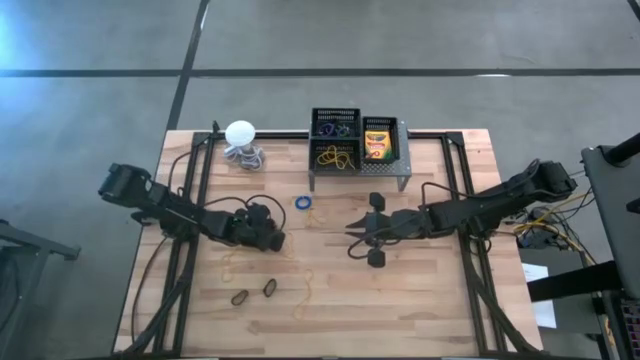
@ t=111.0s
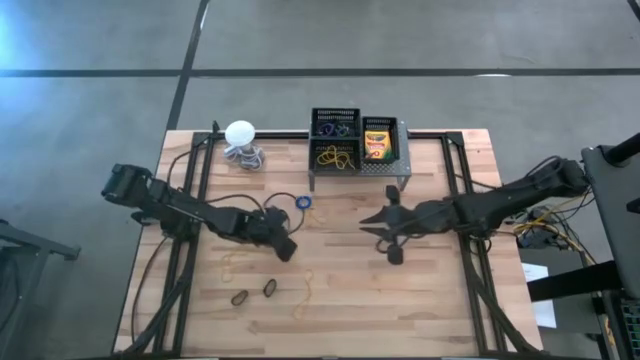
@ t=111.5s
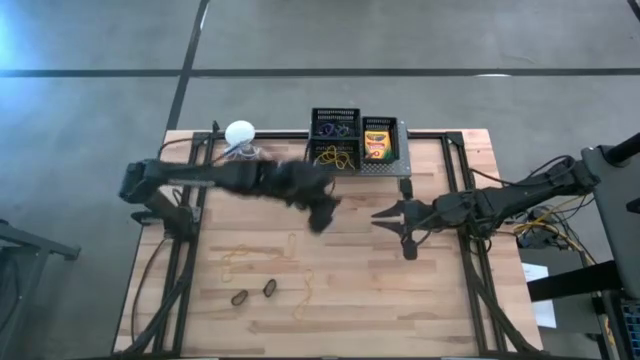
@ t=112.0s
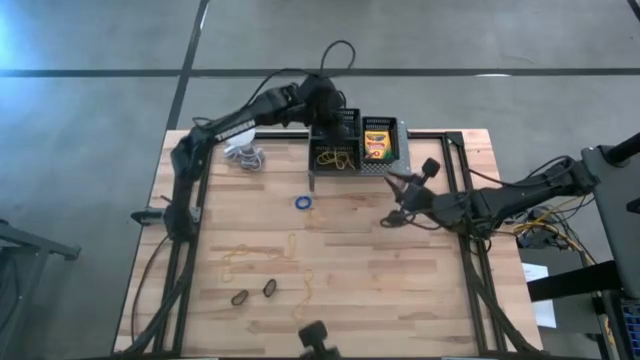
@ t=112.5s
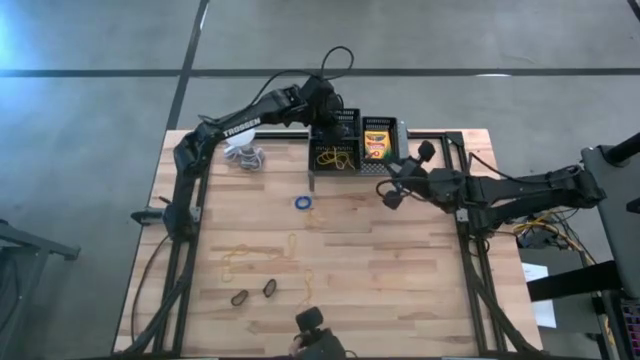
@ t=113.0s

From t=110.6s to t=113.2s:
Task: Pick & Place Office Desk Supplies
Put the black spring keychain into the top left black bin

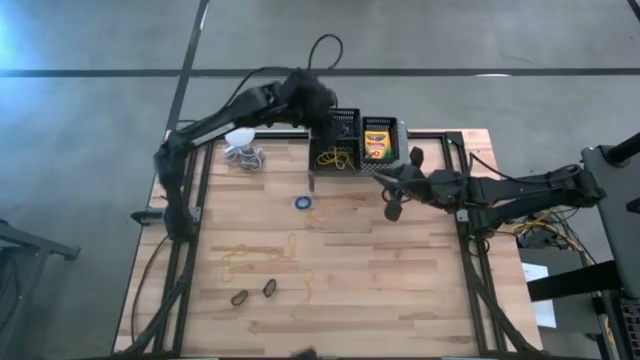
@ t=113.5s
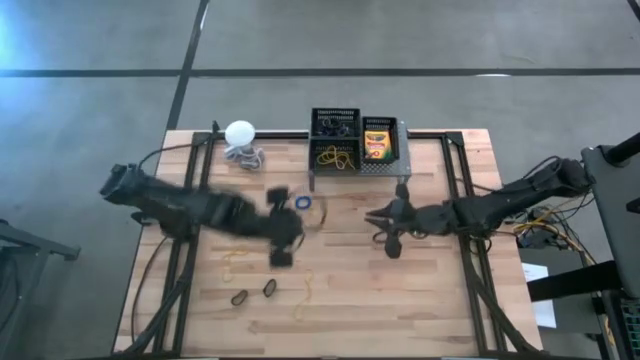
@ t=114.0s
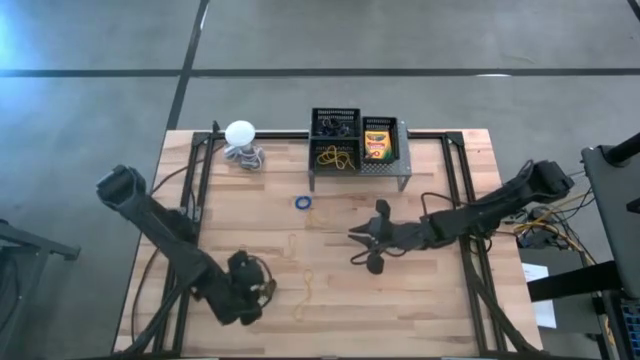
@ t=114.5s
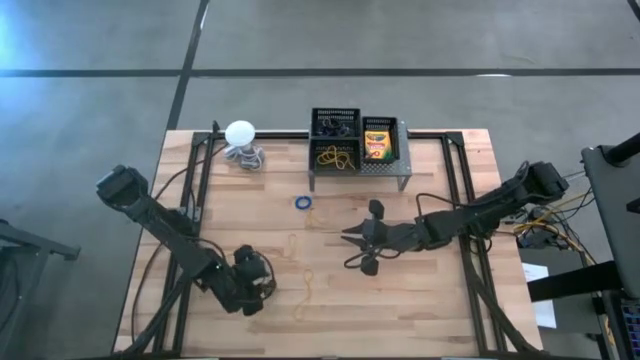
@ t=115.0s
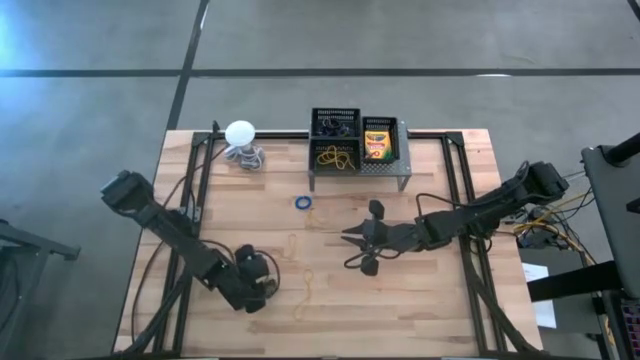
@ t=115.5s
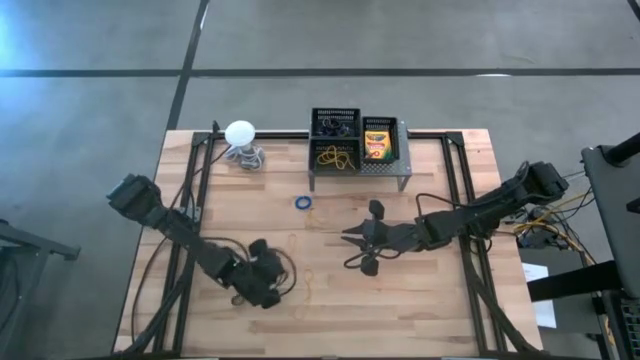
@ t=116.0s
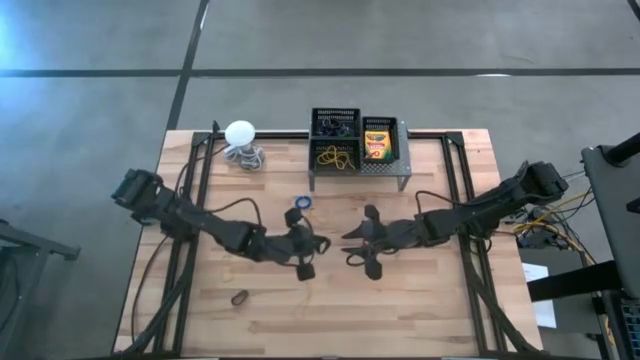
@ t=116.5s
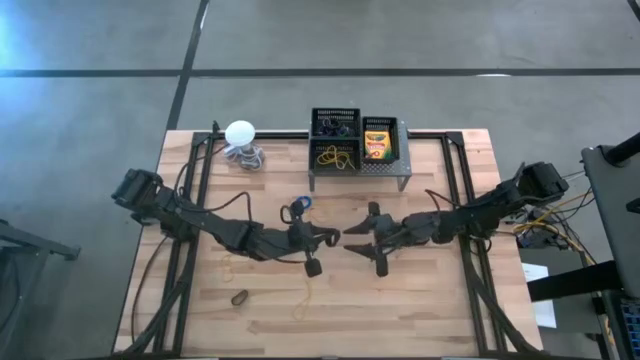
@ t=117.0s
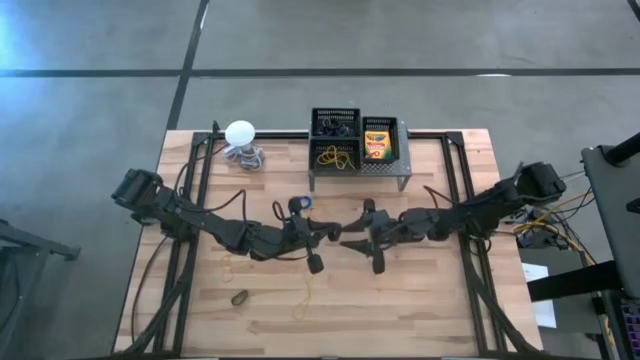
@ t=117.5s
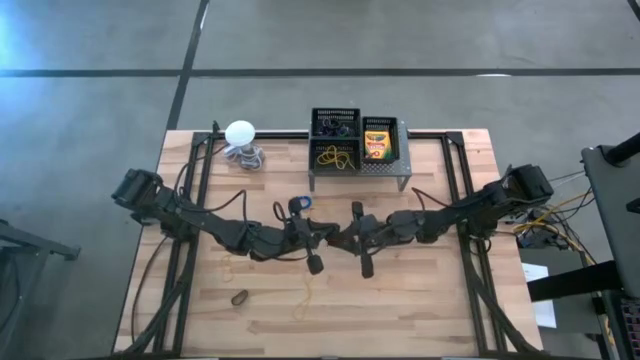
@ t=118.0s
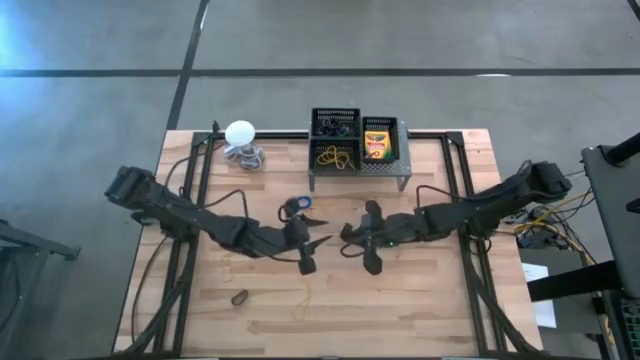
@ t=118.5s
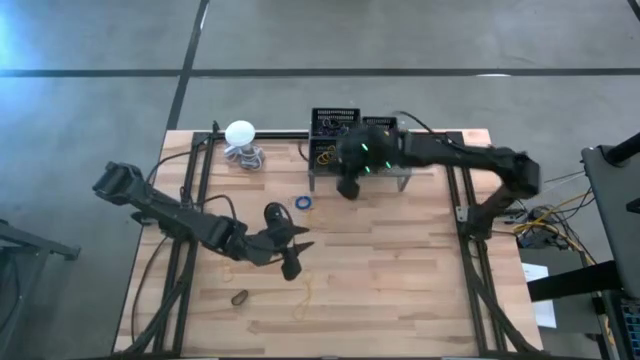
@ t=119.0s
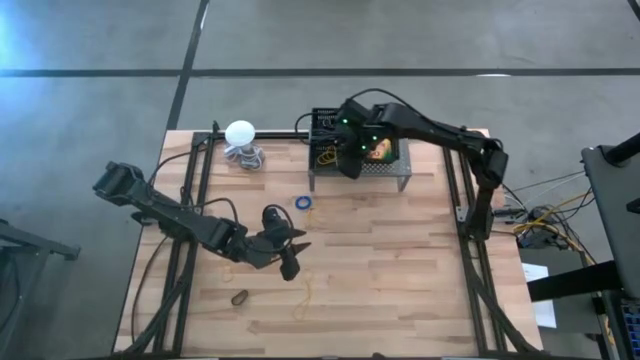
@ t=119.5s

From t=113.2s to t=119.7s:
Put the black rubber band into the bottom left black bin

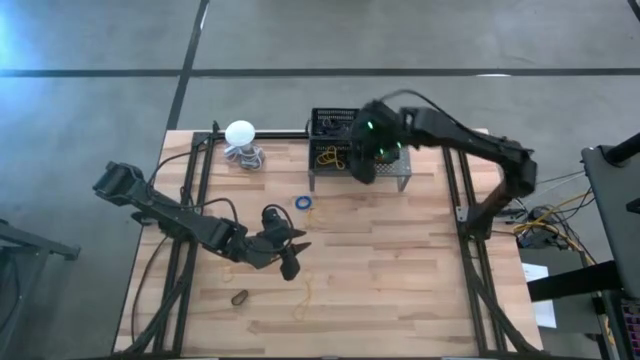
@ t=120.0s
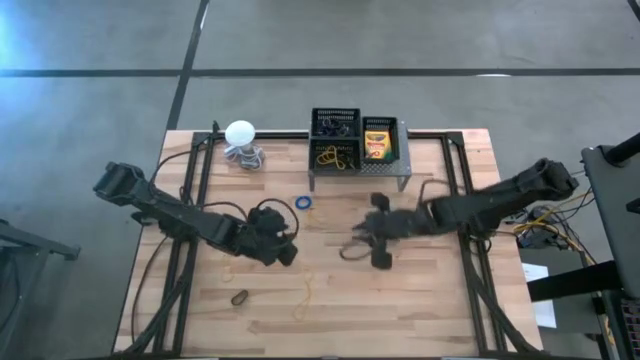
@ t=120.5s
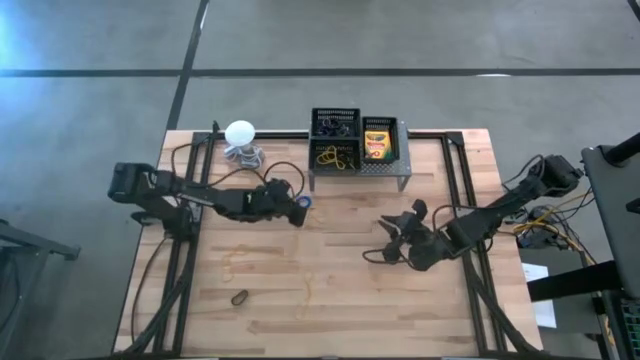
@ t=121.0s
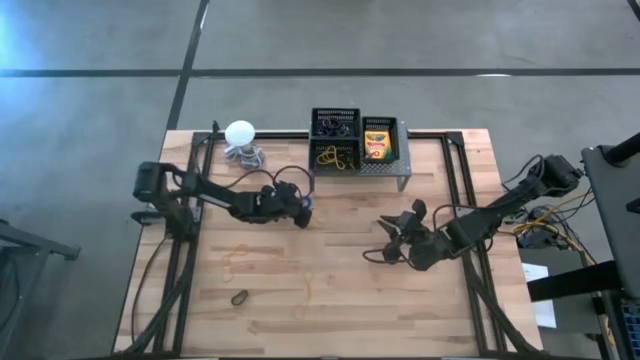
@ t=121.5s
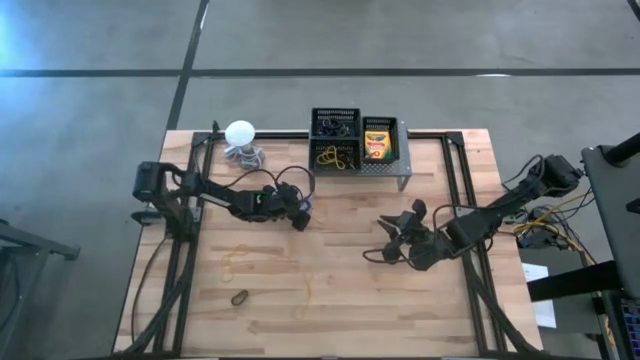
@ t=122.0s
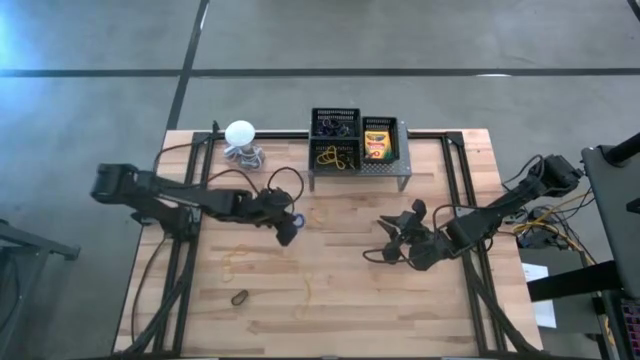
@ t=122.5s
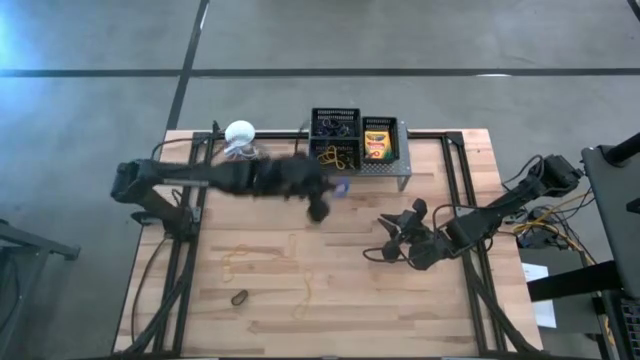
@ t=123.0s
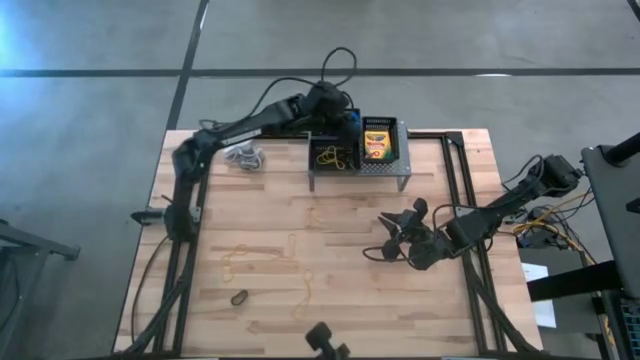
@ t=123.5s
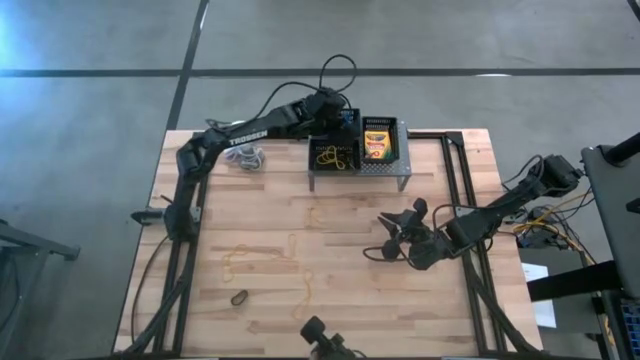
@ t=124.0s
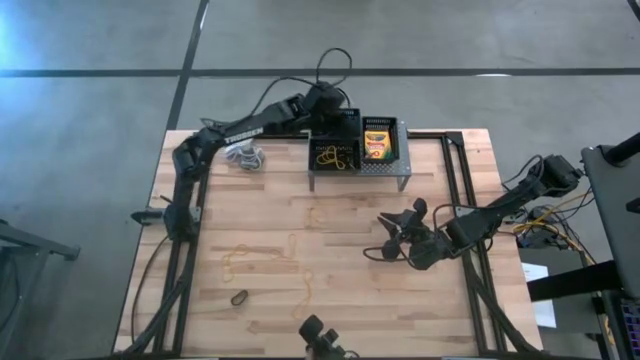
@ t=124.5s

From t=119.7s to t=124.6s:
Put the blue spring keychain into the top left black bin

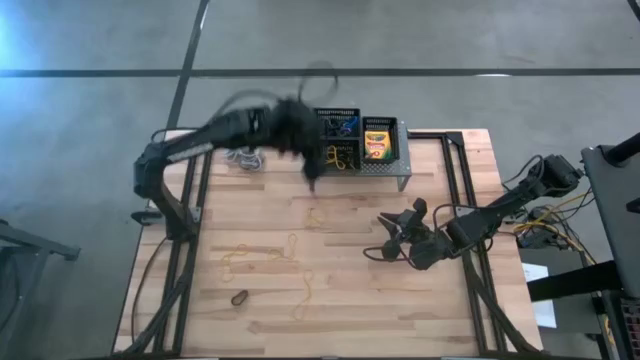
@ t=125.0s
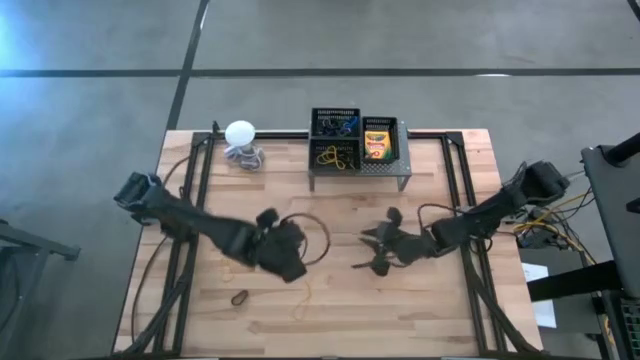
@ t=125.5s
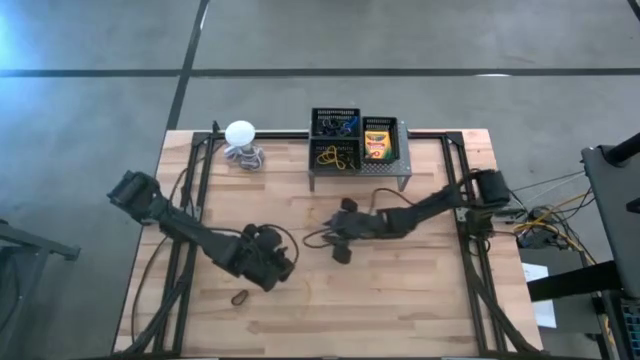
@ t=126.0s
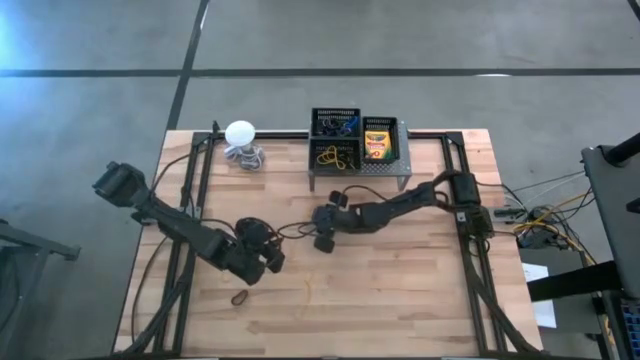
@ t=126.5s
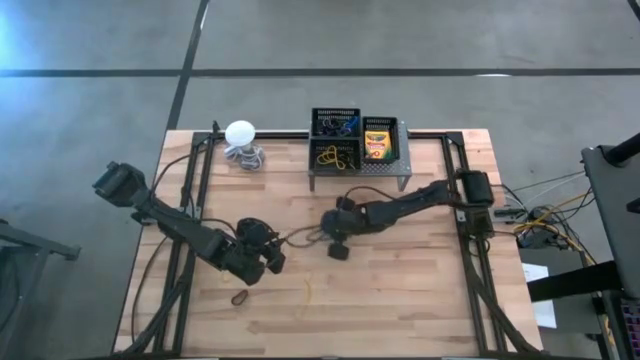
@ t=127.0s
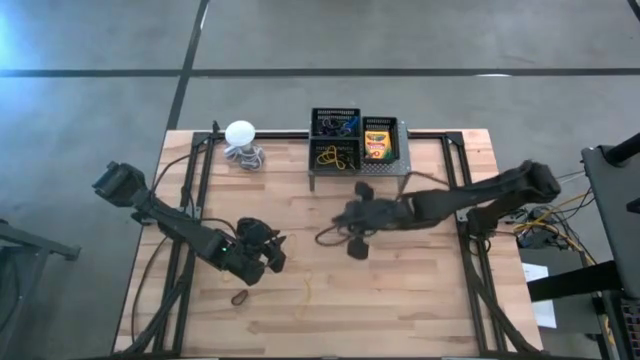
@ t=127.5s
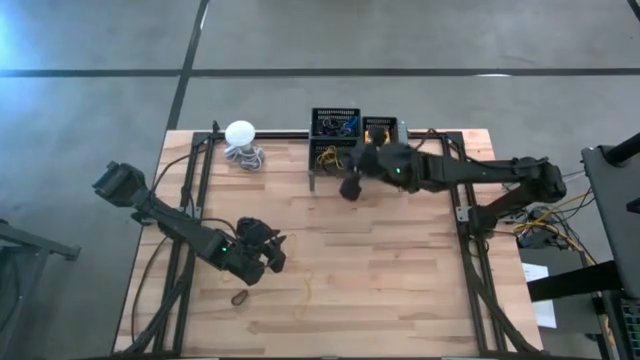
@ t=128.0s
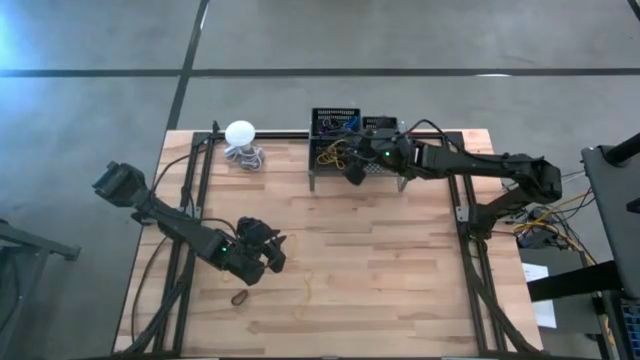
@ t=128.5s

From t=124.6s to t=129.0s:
Put the yellow rubber band into the bottom left black bin

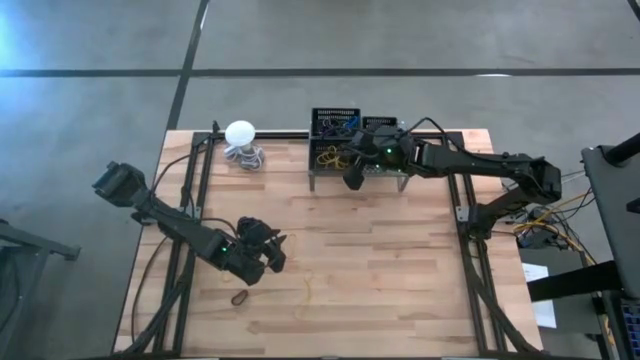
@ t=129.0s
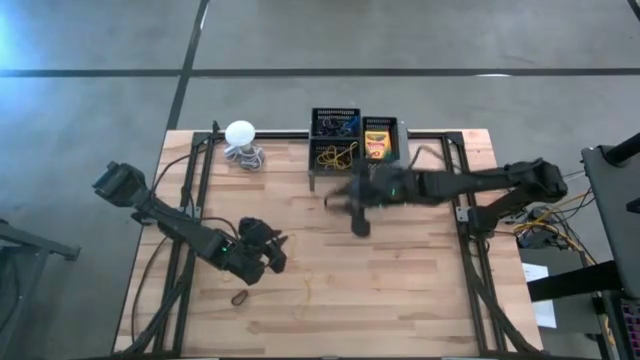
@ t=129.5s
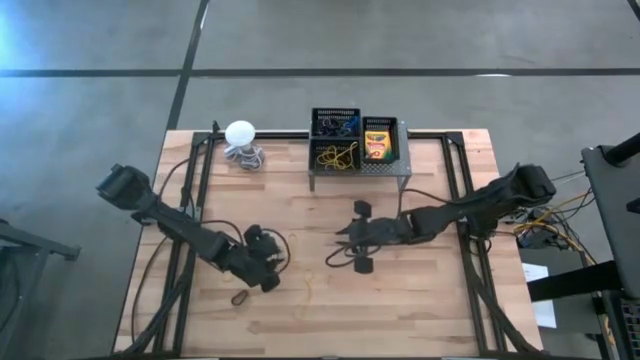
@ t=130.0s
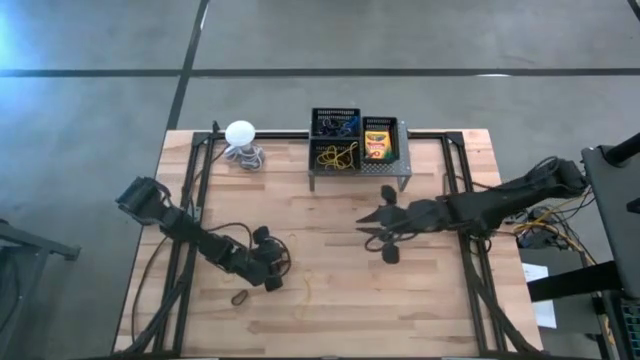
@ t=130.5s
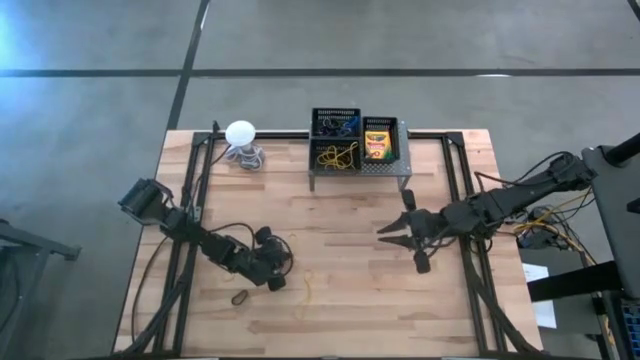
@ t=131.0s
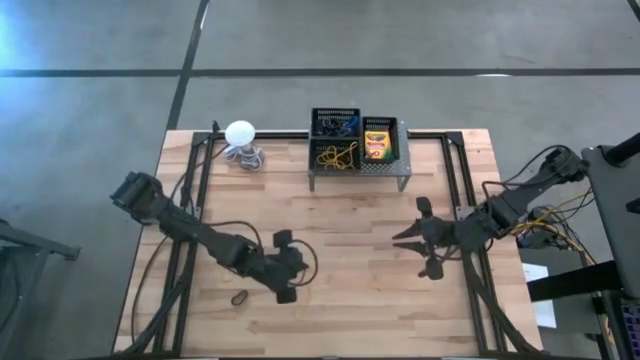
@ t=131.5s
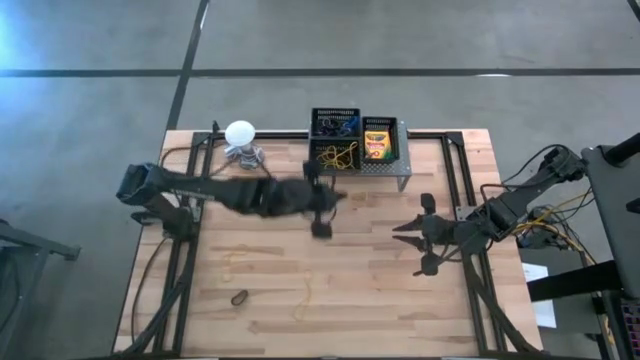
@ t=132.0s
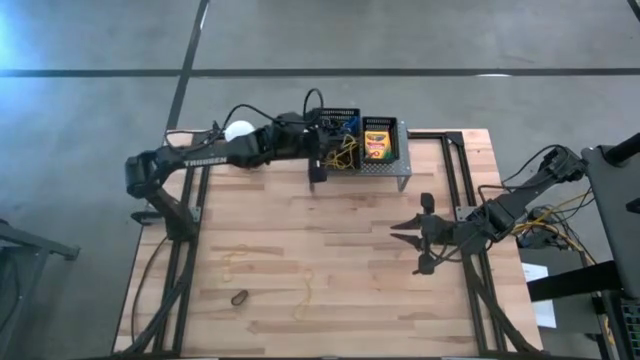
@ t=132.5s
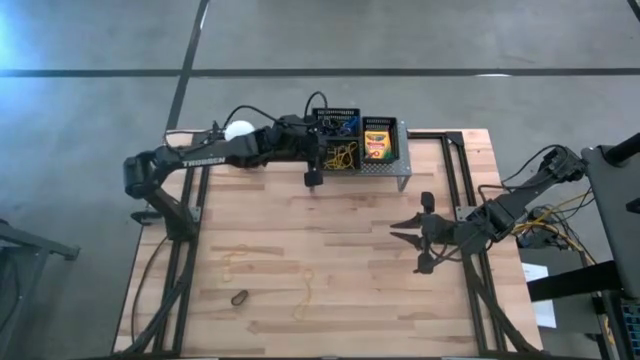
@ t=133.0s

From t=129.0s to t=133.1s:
Put the yellow rubber band into the bottom left black bin
